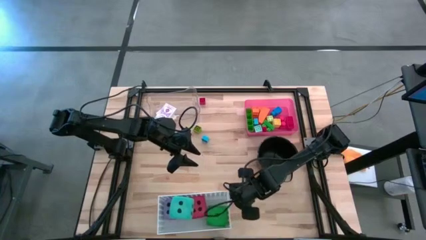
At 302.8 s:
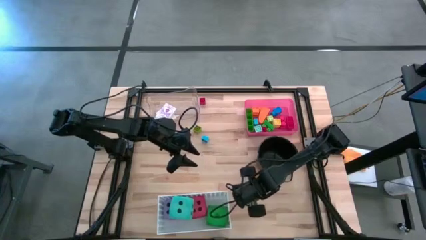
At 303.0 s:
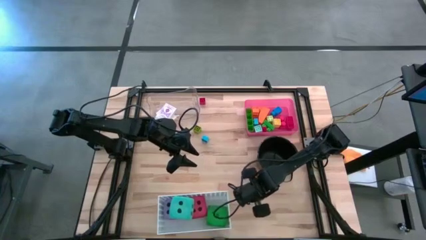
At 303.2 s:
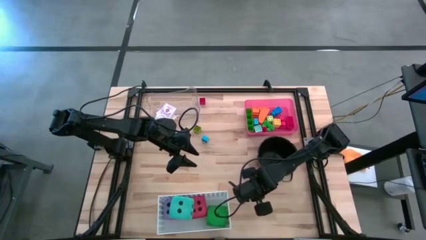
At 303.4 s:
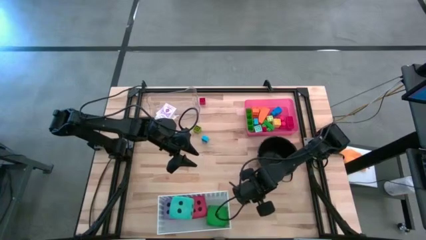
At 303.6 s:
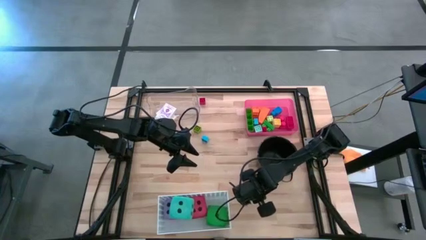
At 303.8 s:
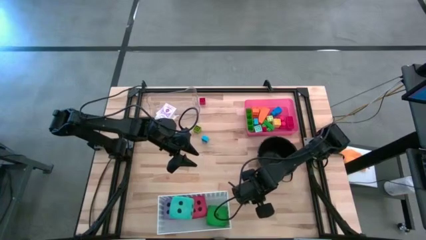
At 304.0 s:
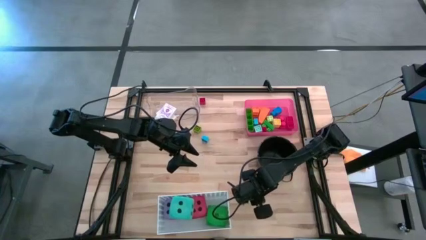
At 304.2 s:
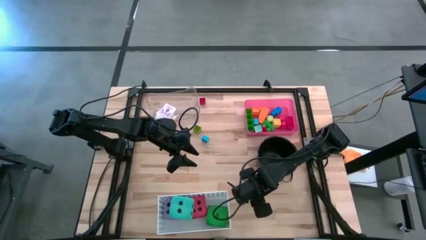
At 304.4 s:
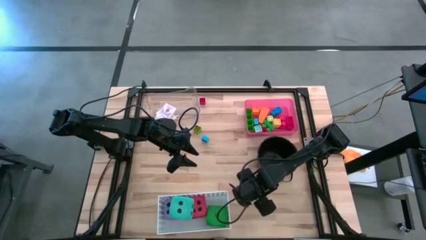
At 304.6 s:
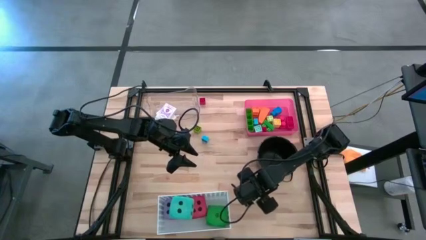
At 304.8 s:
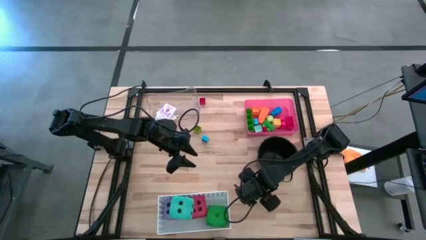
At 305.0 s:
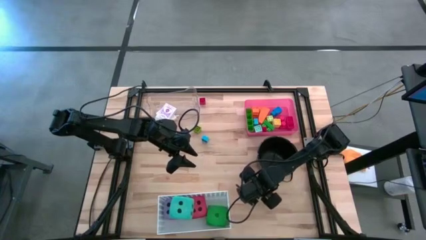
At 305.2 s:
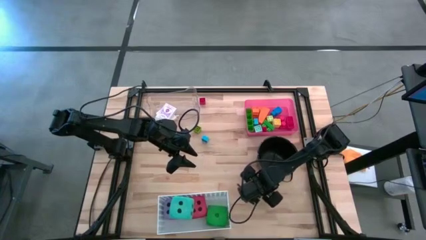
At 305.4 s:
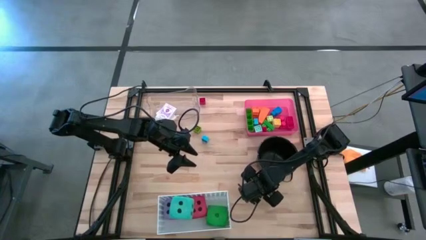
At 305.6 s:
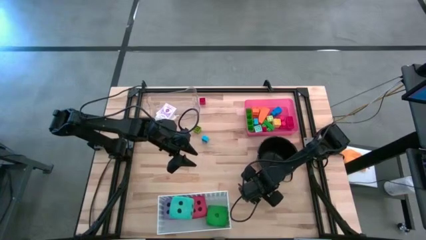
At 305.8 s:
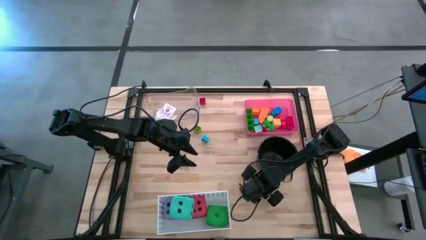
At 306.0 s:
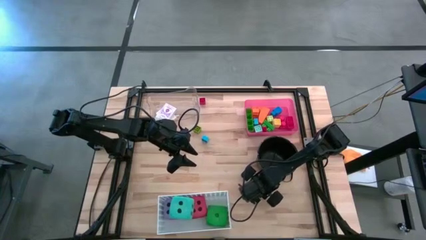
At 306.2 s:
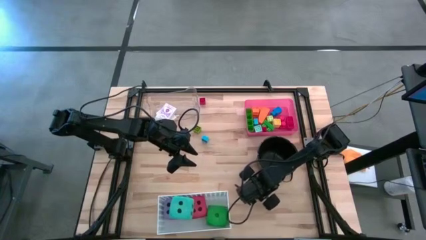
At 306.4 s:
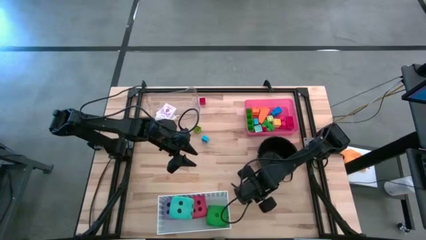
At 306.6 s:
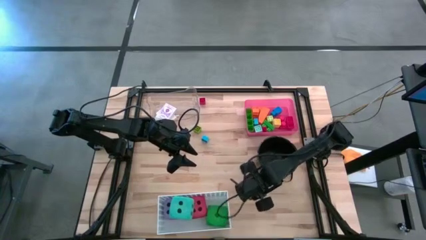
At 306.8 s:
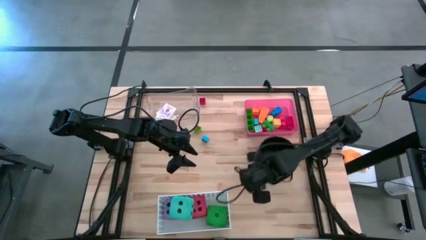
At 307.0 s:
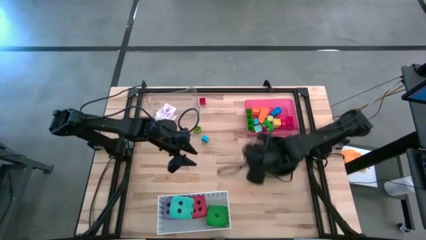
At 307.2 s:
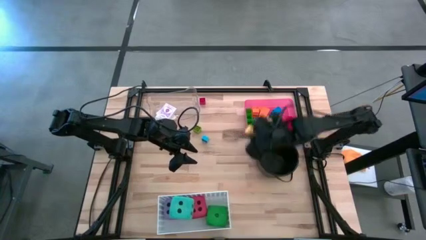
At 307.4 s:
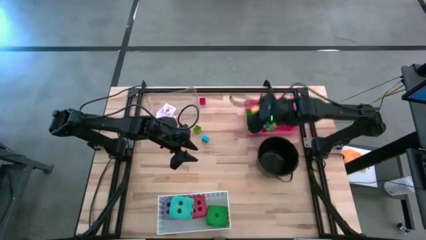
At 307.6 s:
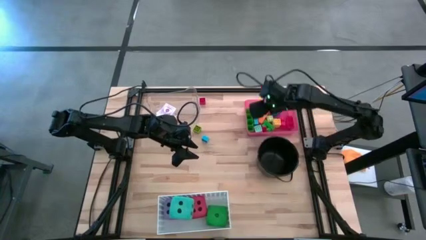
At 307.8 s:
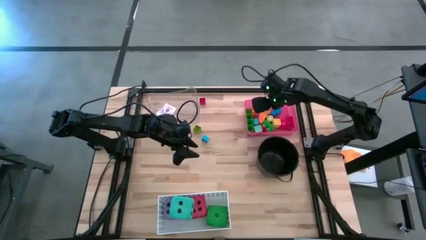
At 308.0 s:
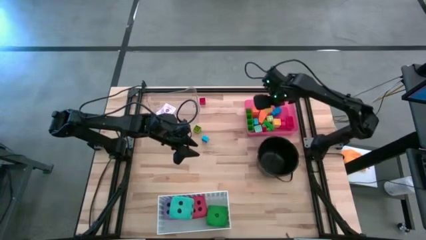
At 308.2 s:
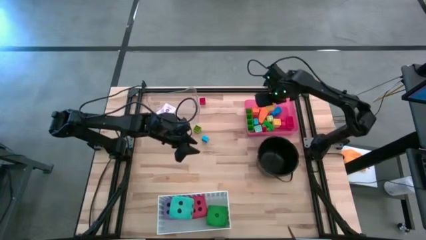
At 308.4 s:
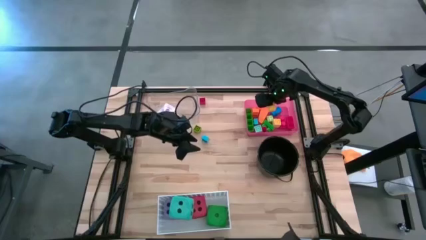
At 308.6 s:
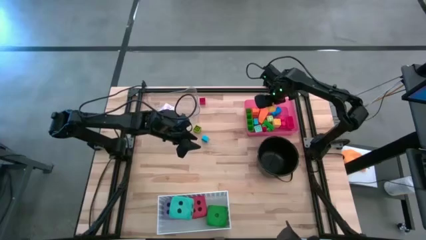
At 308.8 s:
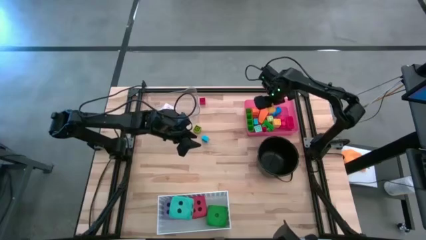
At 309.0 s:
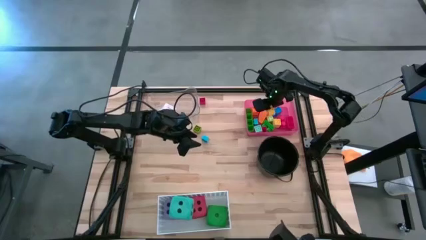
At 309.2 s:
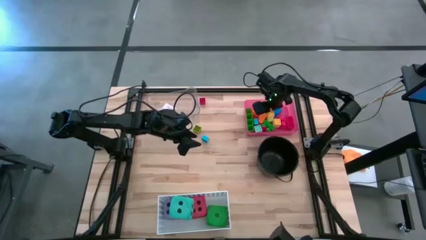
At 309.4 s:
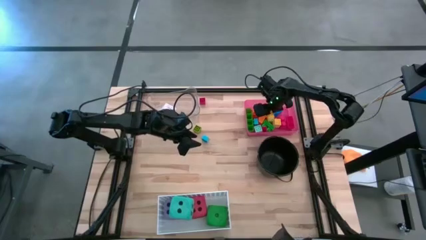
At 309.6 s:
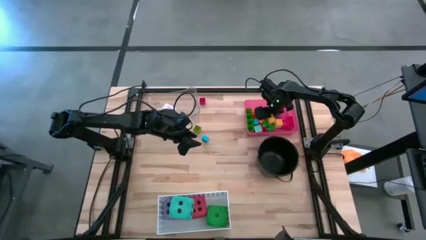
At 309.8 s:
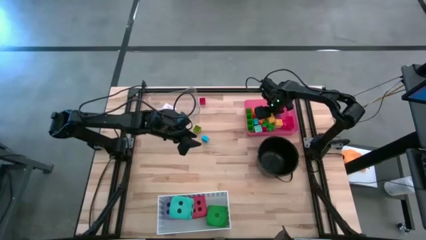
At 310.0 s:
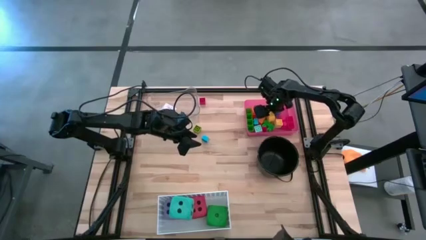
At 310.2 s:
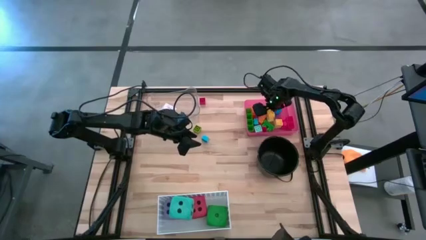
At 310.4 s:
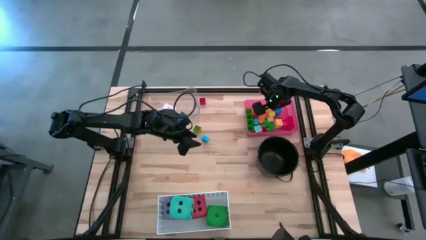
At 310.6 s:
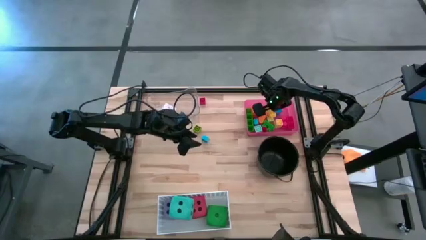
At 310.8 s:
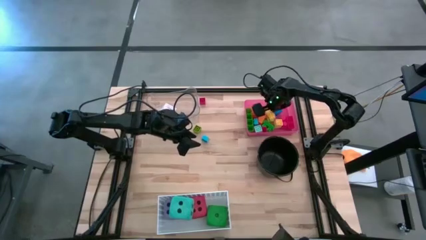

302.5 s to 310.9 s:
Task: Pick & Place Toys
Put the yellow game piece into the red bin

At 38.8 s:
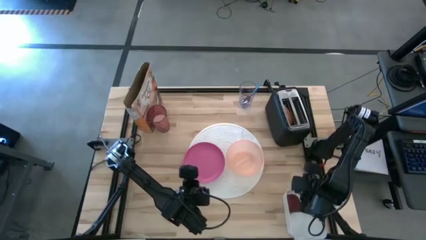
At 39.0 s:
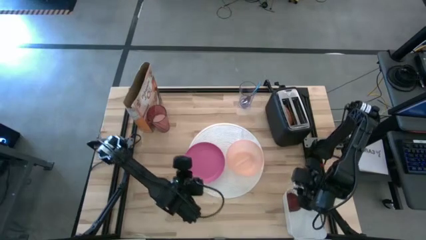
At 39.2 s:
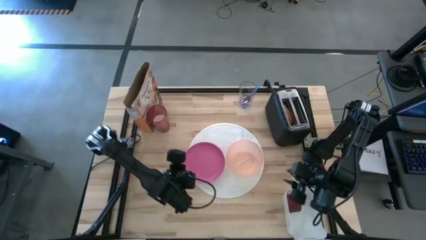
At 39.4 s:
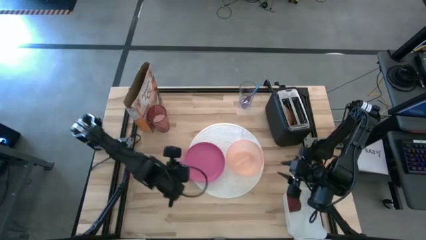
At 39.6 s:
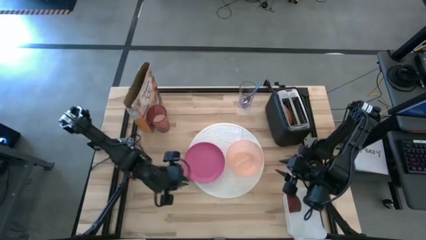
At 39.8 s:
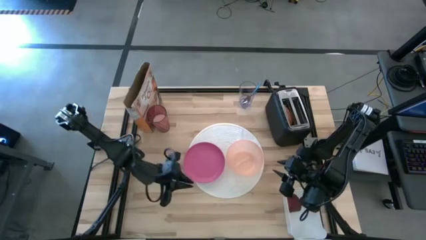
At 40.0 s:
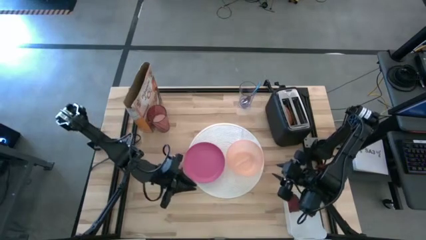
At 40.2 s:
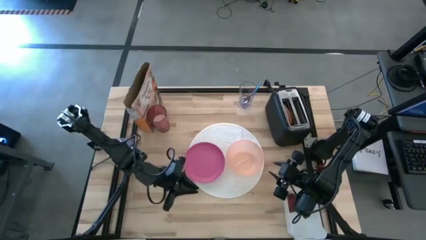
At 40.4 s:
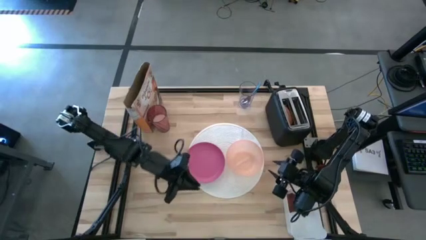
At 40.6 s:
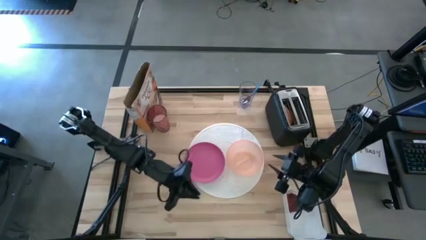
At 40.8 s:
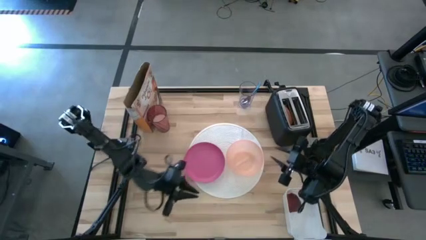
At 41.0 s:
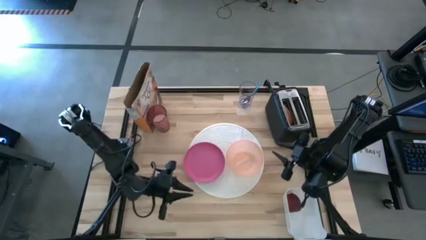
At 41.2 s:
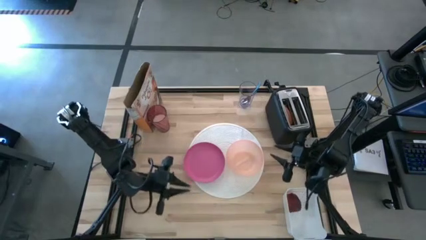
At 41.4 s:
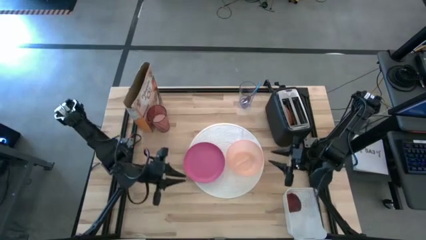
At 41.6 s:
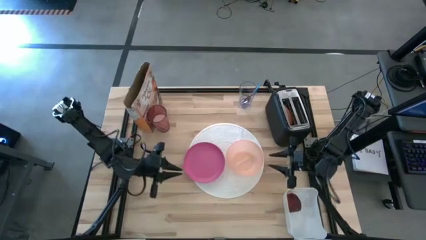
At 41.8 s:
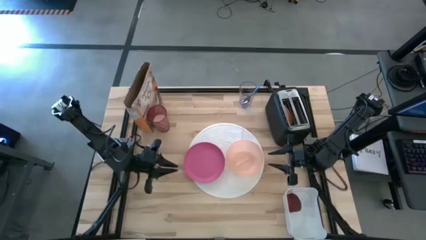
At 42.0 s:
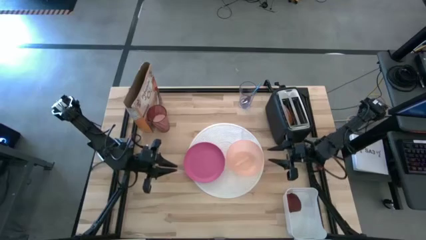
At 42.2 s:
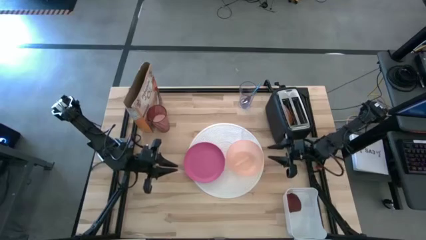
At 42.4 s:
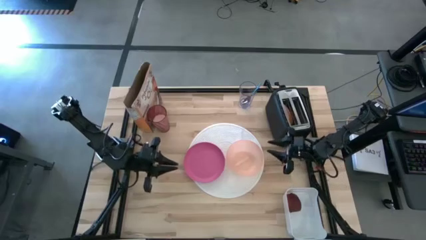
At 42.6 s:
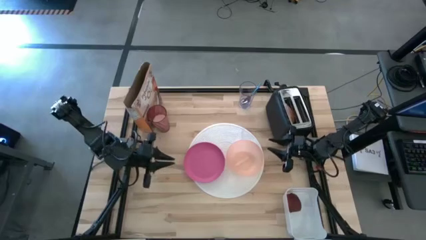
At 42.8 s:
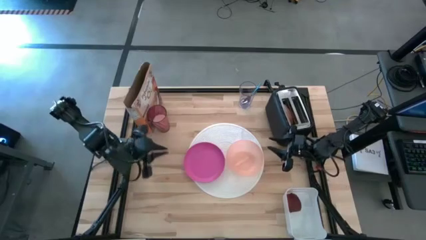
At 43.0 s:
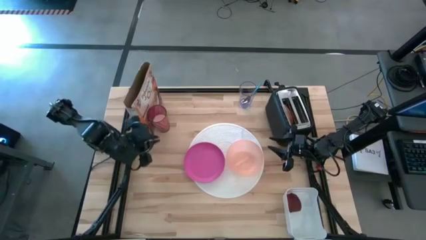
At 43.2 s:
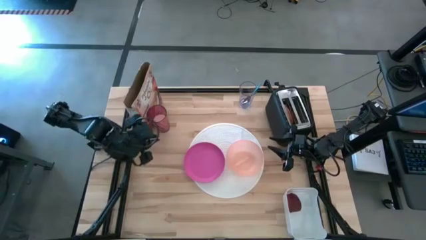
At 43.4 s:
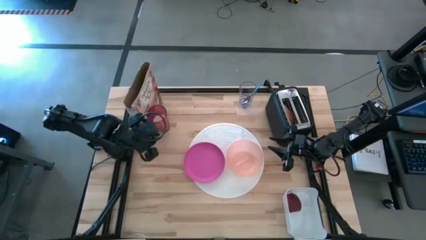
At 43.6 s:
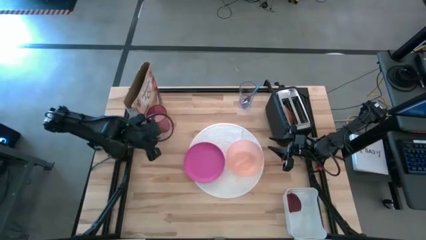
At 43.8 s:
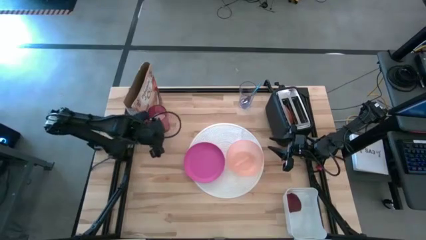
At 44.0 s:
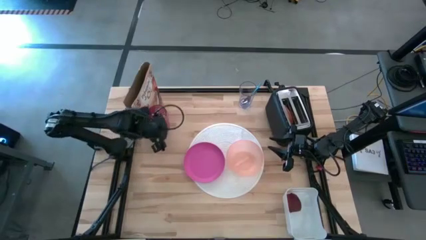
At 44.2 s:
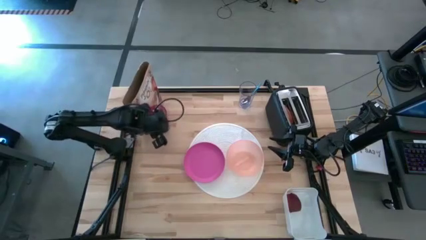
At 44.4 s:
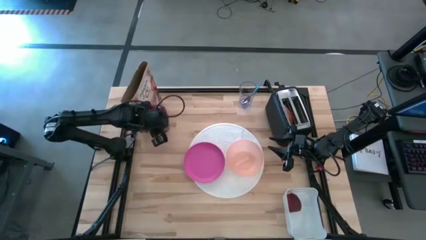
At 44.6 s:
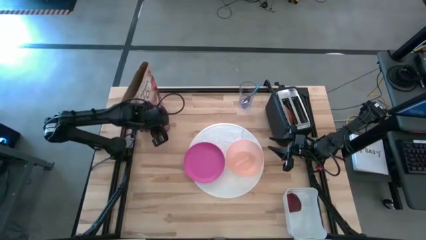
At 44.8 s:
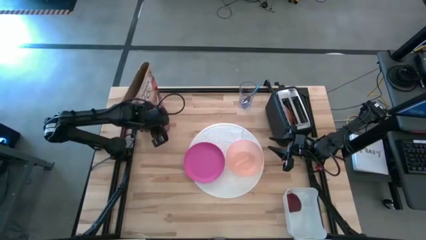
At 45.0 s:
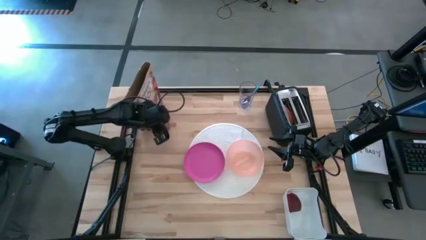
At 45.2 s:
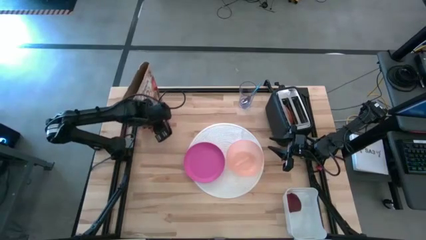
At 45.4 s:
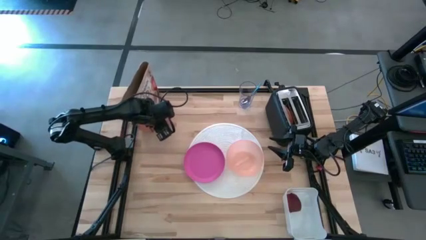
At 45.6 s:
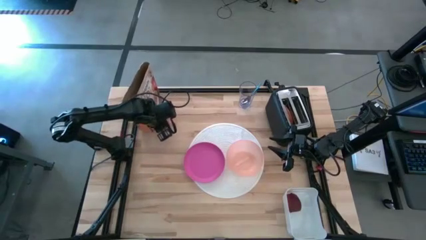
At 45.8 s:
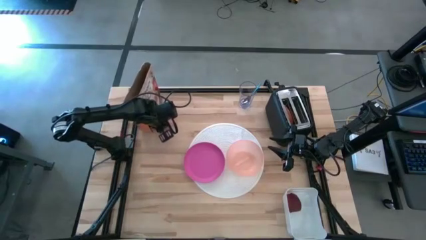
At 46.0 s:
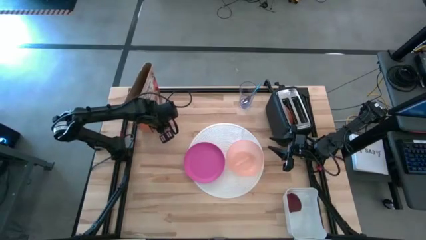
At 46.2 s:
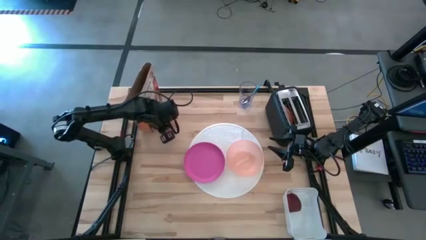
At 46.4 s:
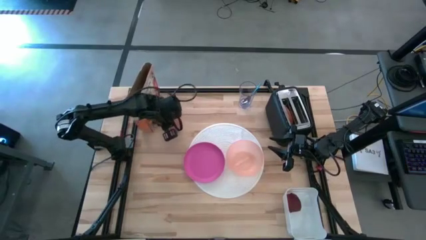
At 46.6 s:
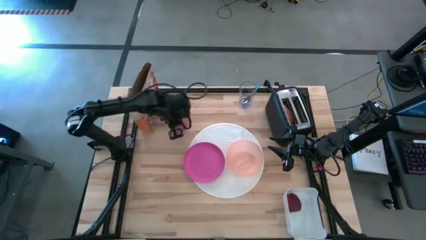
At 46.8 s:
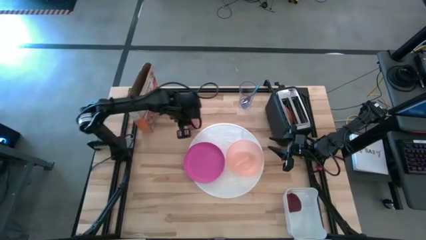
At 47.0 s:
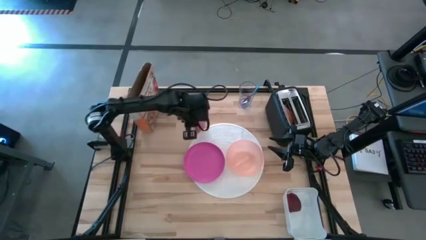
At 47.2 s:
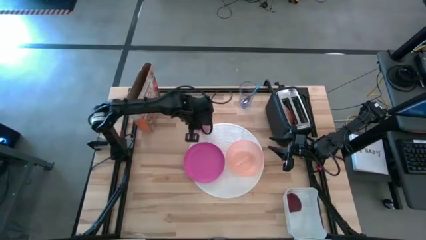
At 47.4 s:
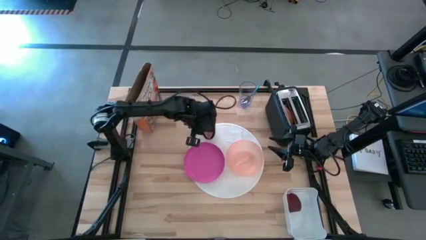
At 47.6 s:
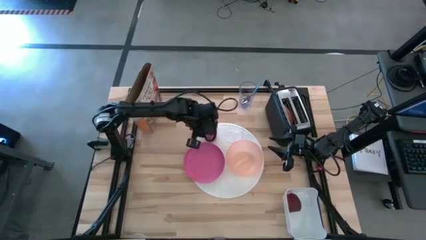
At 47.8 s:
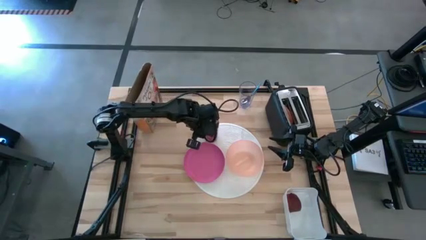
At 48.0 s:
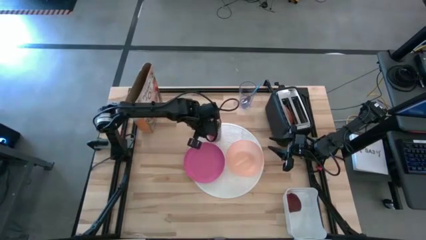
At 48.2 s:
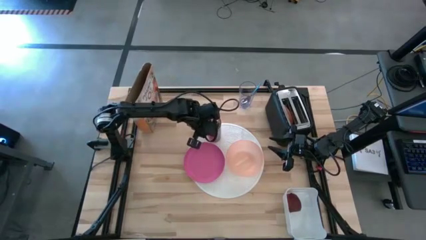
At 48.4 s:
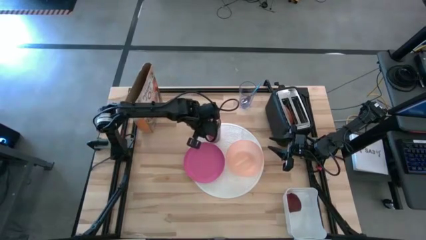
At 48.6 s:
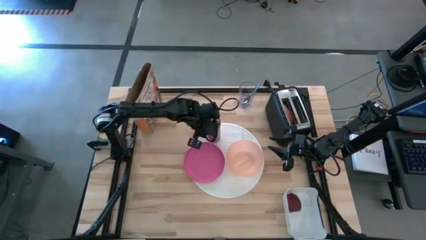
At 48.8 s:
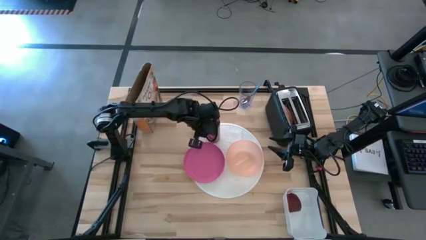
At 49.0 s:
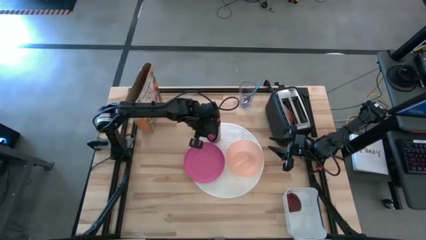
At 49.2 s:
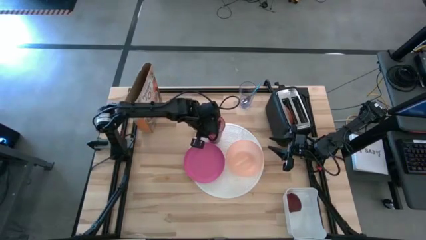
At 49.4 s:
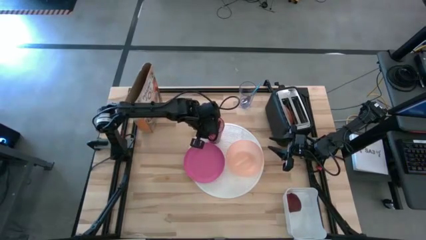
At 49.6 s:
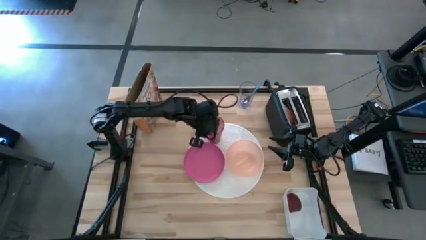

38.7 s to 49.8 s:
Task: Arrange a breakfast setting
Put the red glass of milk on top of the white table mat
